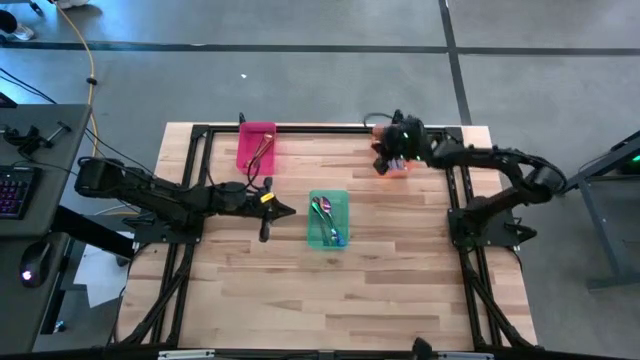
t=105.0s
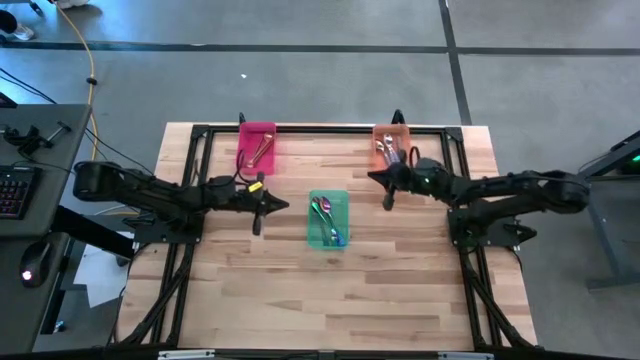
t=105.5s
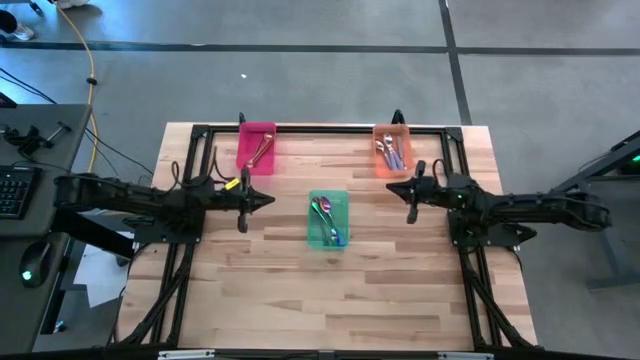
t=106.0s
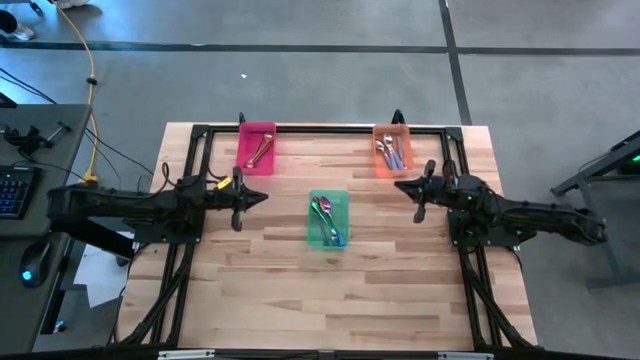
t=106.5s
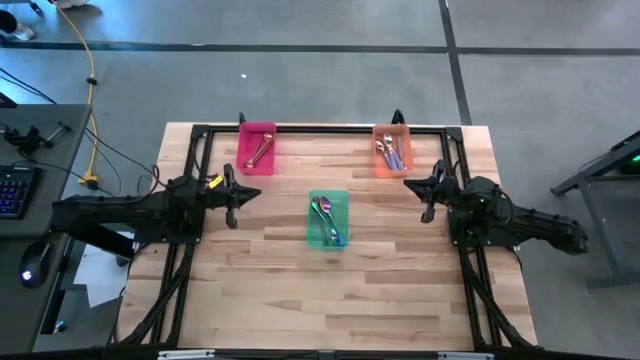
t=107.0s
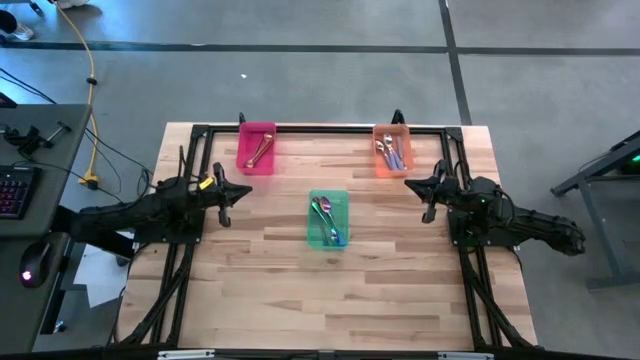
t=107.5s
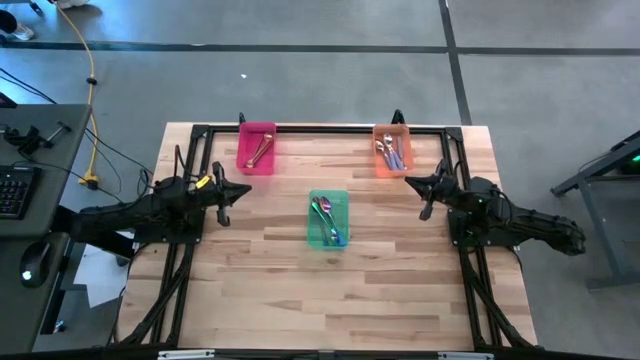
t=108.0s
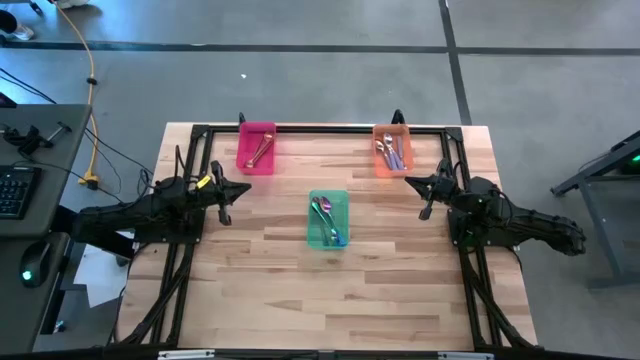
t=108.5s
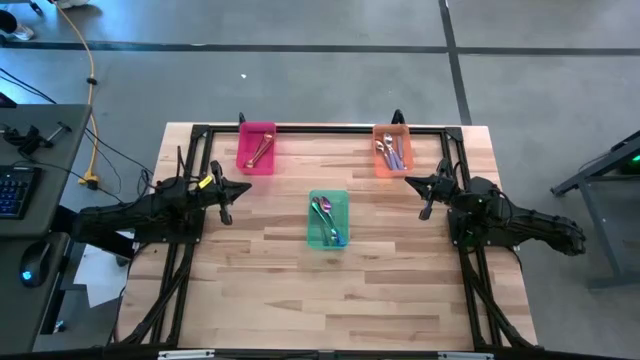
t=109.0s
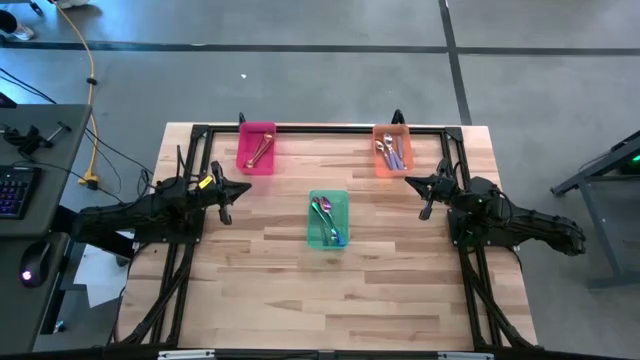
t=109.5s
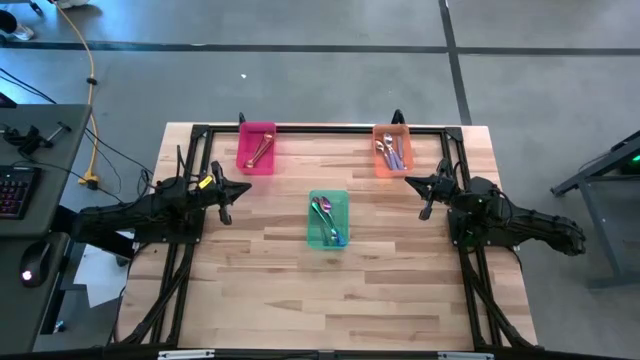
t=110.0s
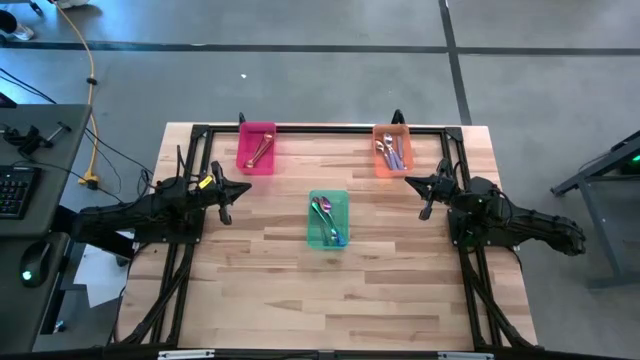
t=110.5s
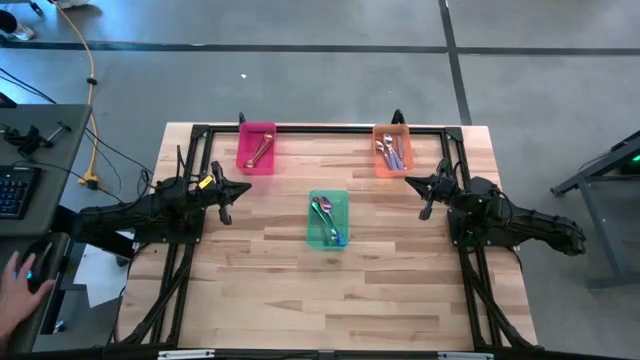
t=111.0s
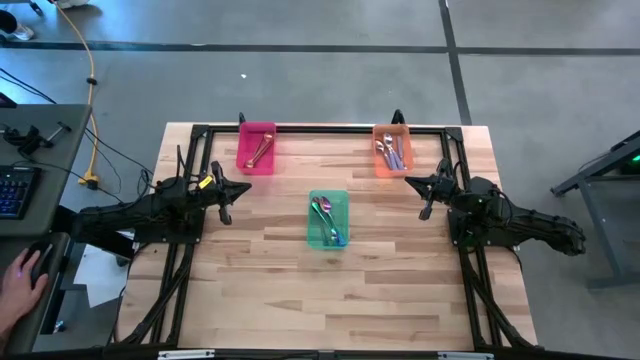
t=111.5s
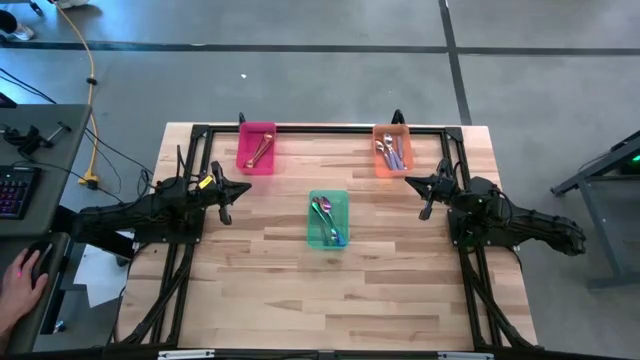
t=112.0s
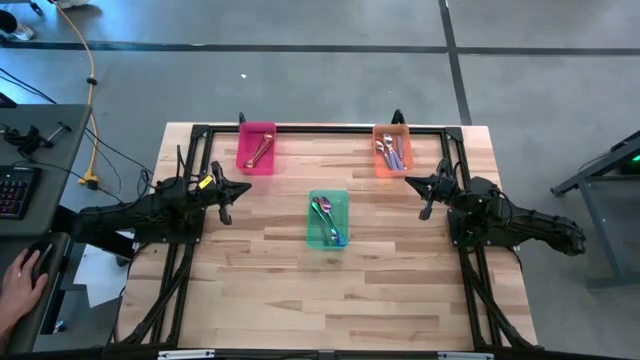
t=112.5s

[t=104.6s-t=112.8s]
Task: Sort silverware by color (type)
Return to Home Position

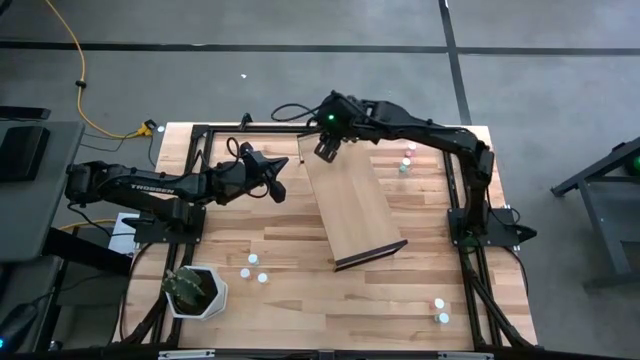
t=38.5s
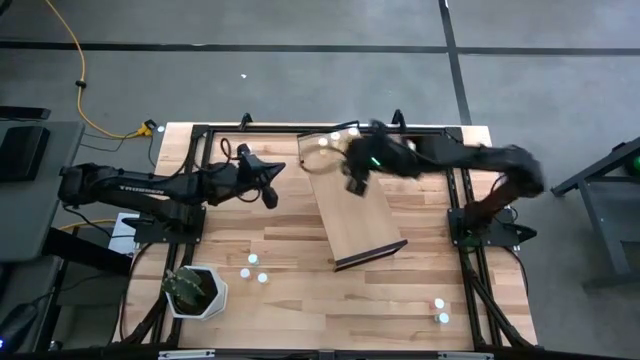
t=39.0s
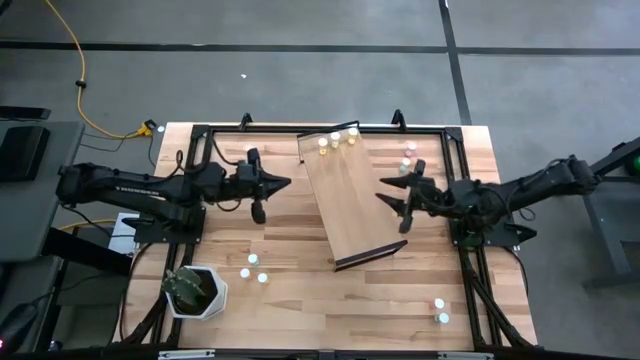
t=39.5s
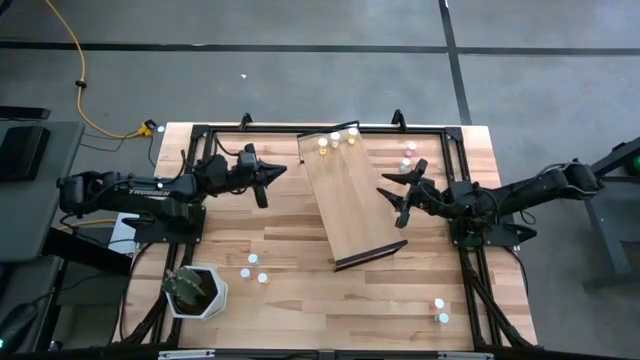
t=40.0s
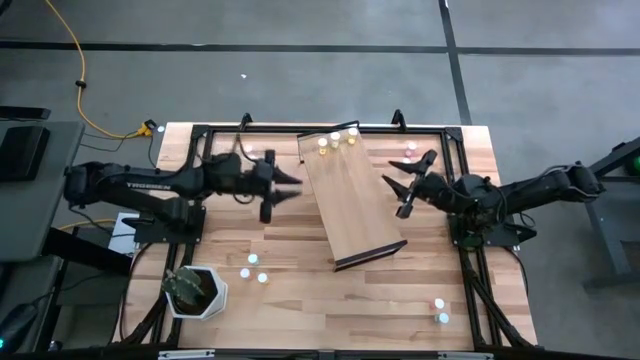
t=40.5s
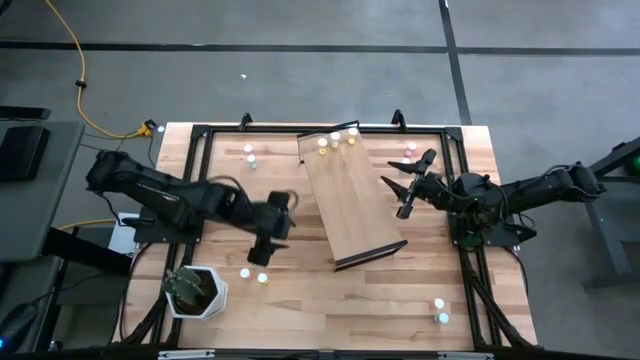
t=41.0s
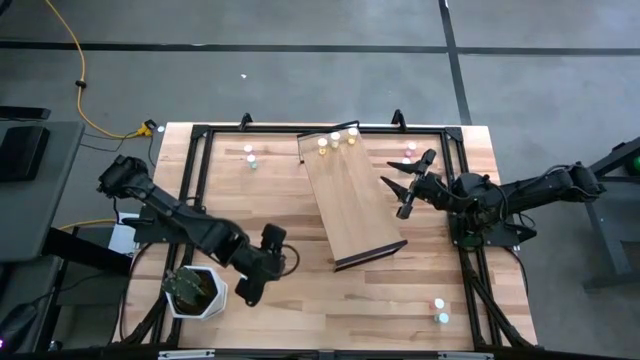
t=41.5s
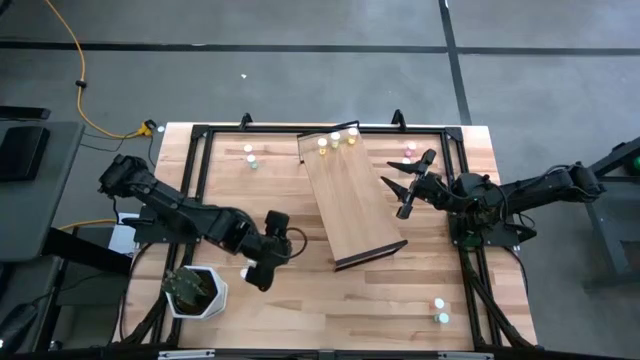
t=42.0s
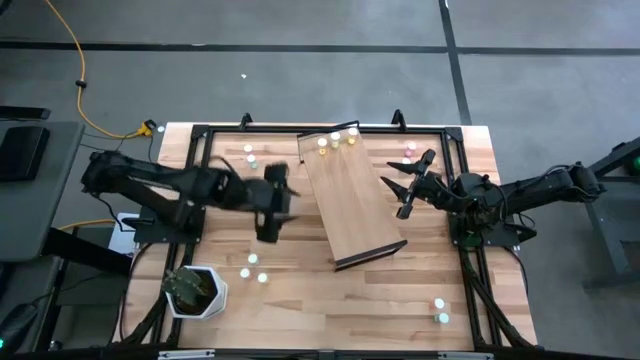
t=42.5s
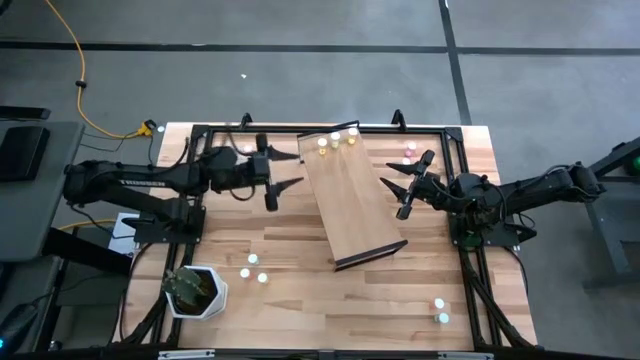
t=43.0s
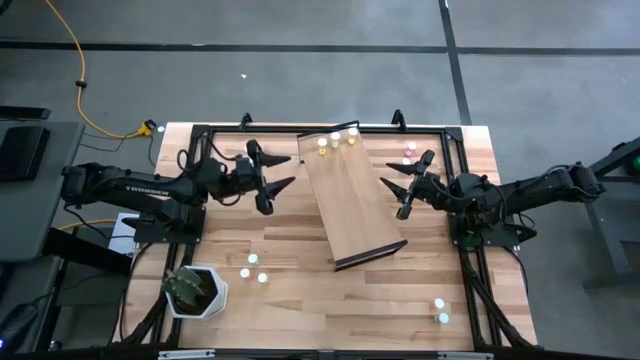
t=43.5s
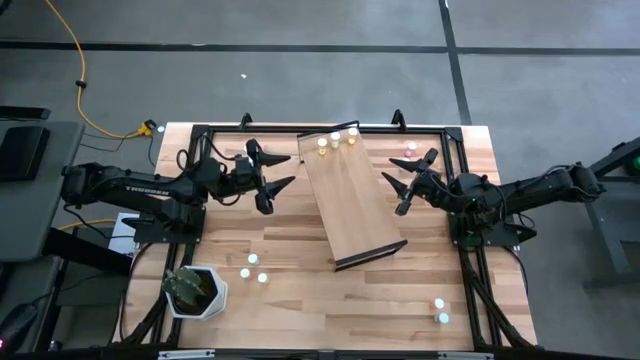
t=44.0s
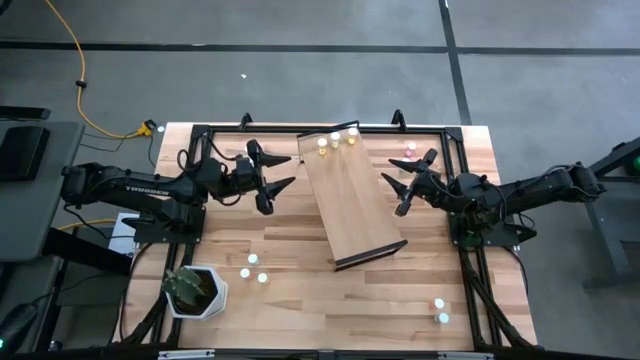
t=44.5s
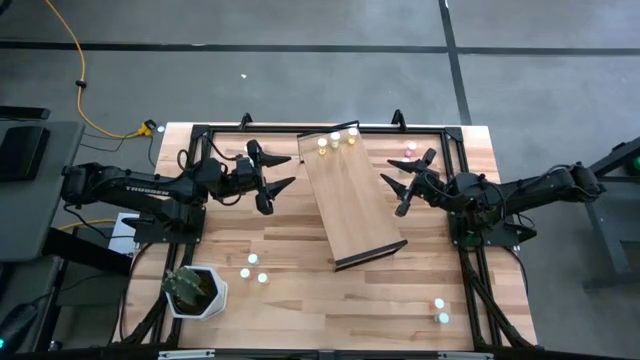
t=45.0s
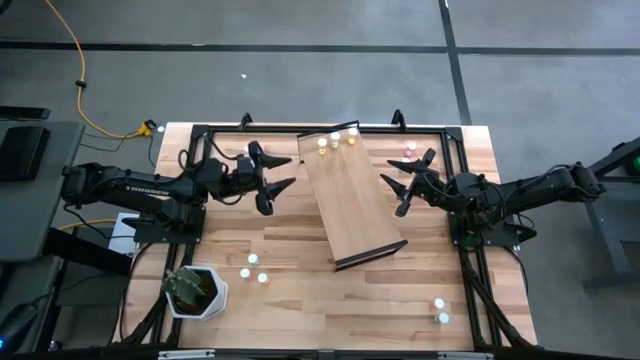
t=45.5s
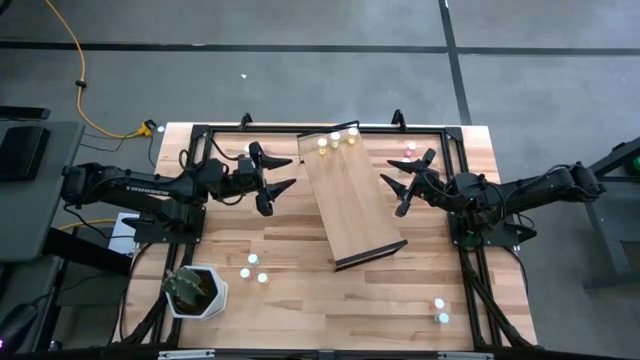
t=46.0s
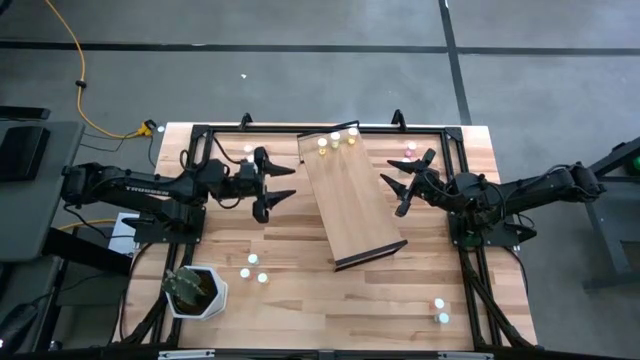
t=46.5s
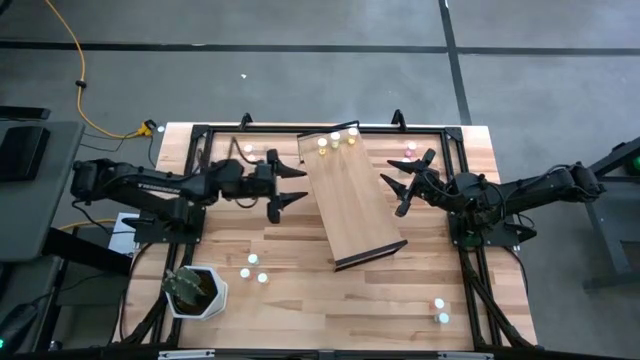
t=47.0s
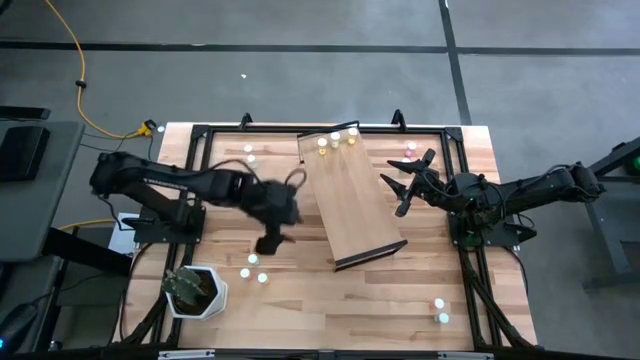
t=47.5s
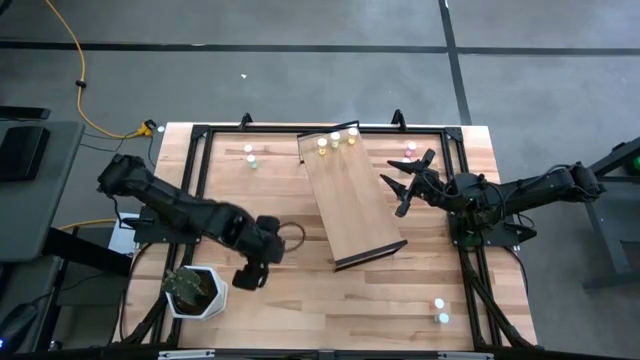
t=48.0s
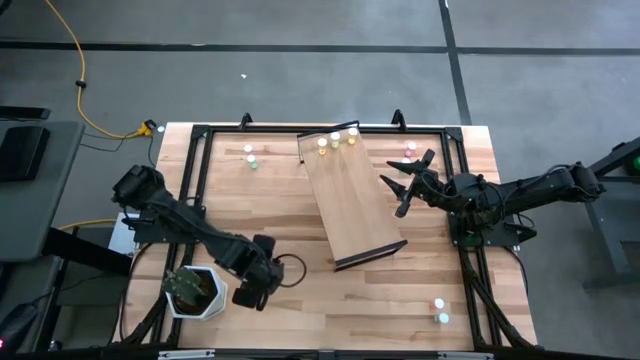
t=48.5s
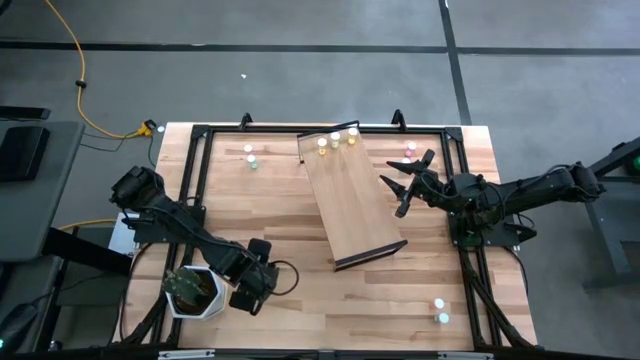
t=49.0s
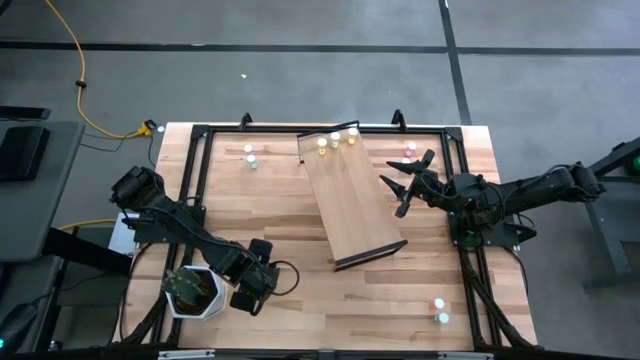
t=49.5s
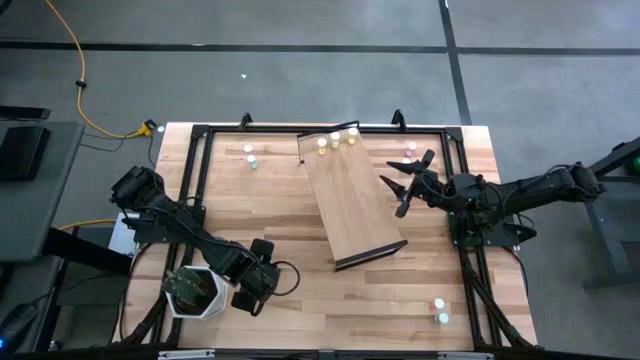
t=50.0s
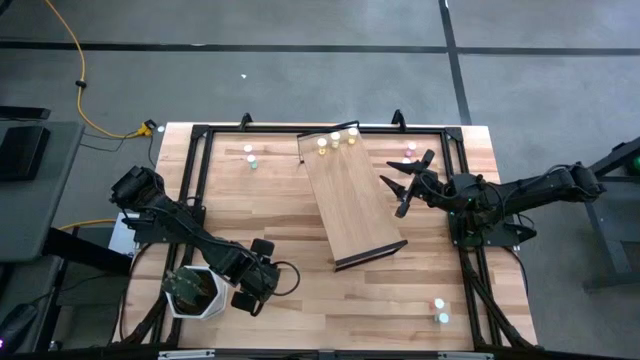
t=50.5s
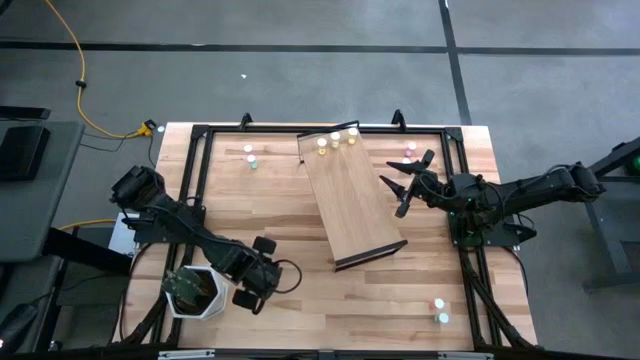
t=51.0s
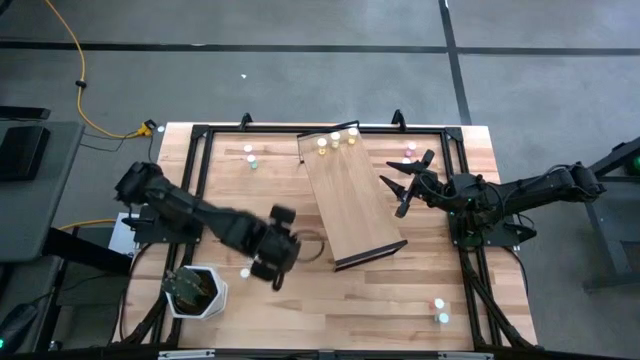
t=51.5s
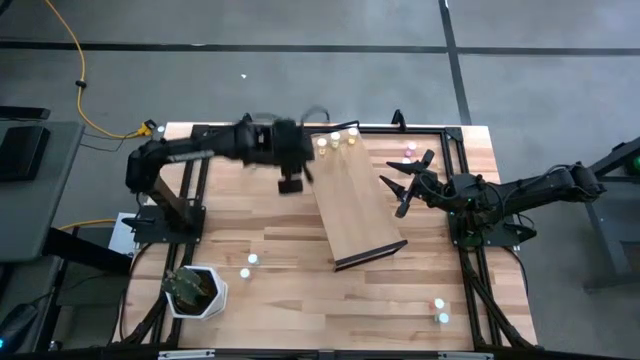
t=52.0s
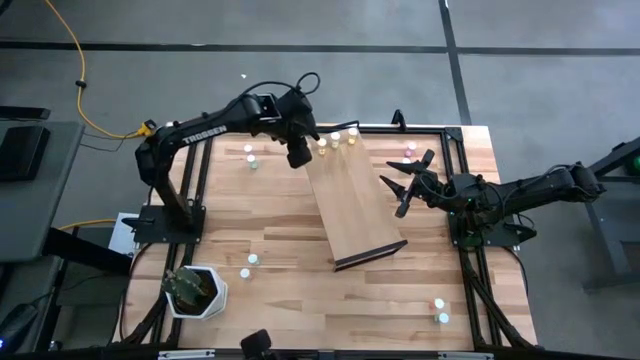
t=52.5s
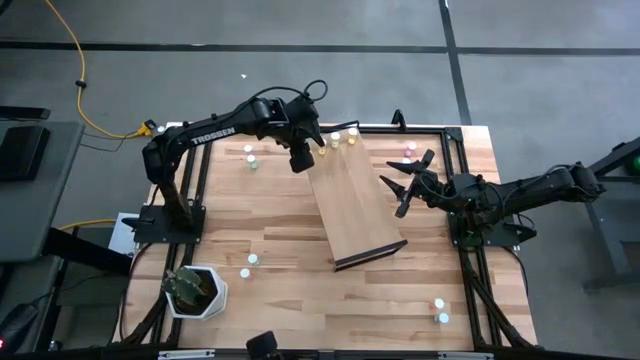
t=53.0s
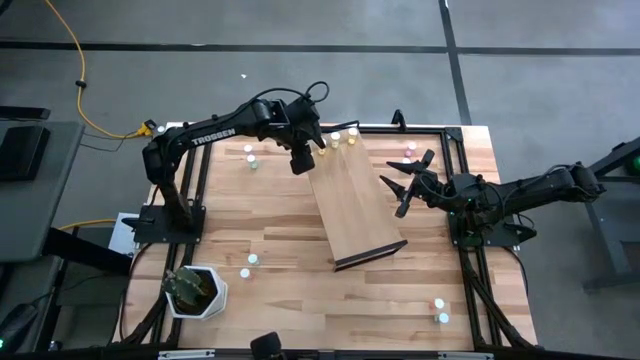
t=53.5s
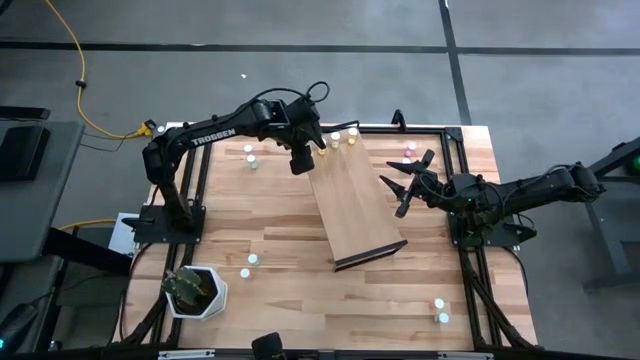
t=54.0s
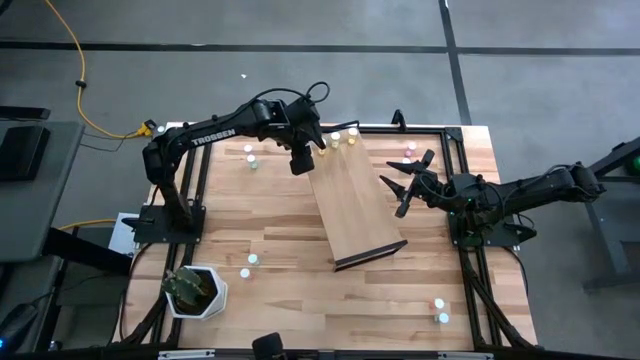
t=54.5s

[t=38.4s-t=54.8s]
Task: Pick and place medicine bottles onto shelf by color
Put the yellow pill bottle on the shelf aligned with the other yellow pill bottles
